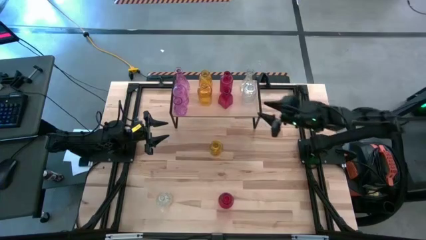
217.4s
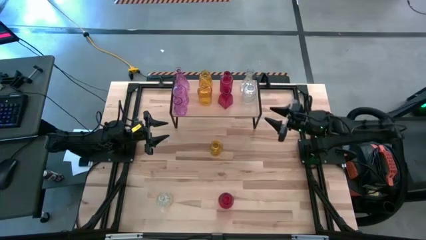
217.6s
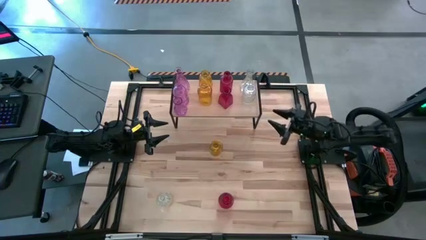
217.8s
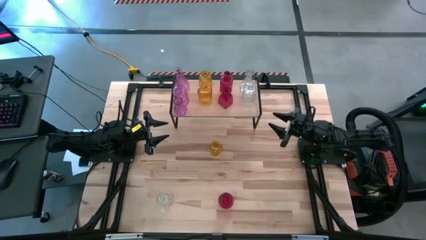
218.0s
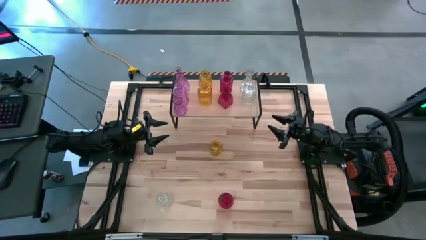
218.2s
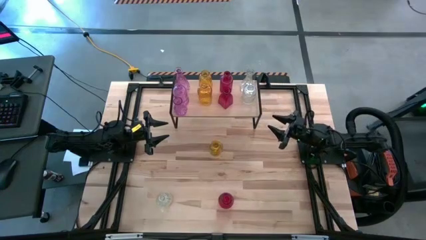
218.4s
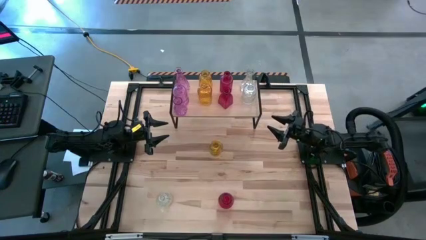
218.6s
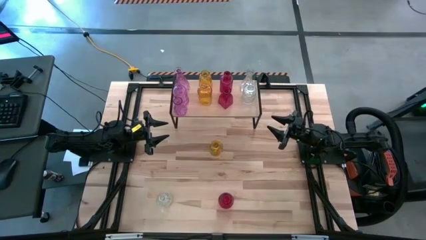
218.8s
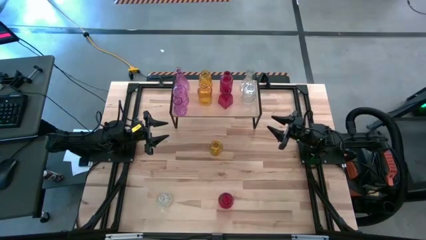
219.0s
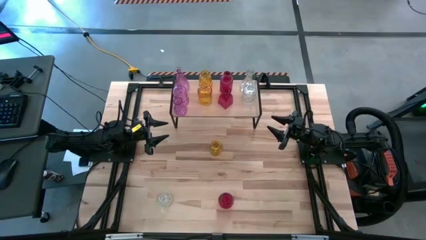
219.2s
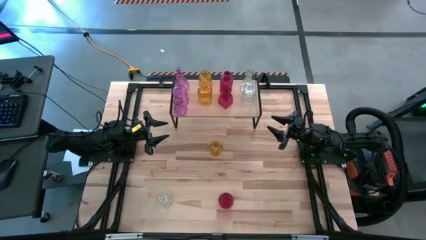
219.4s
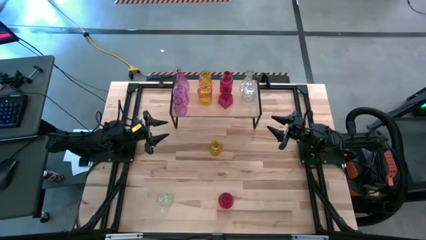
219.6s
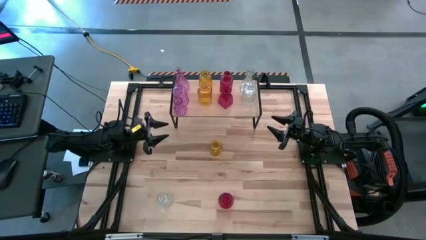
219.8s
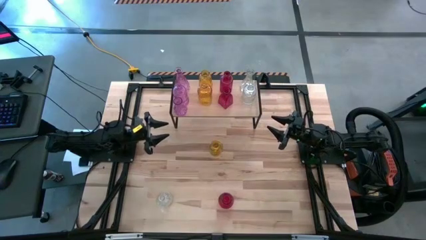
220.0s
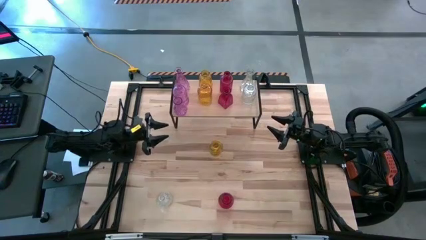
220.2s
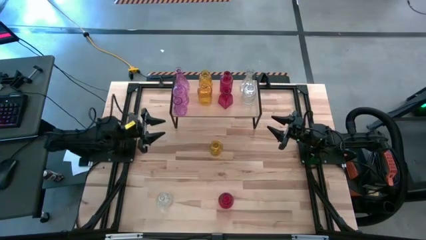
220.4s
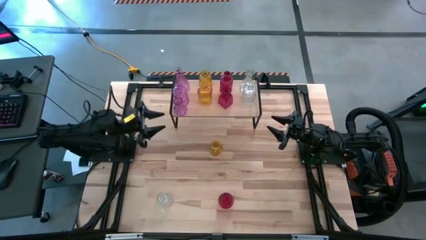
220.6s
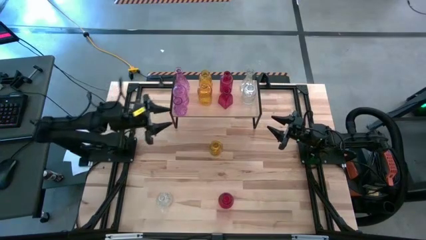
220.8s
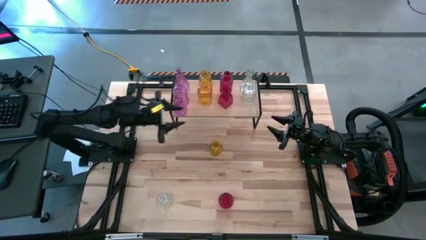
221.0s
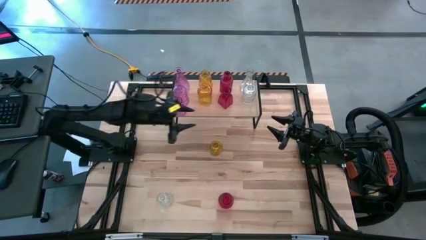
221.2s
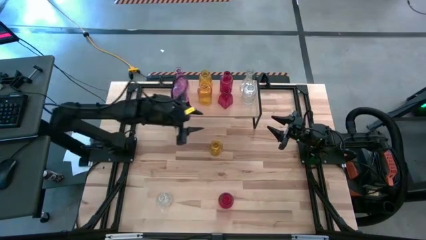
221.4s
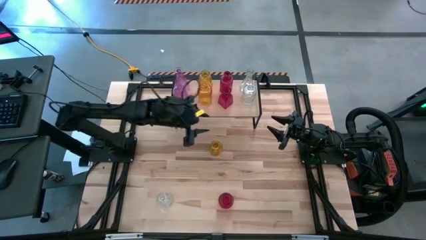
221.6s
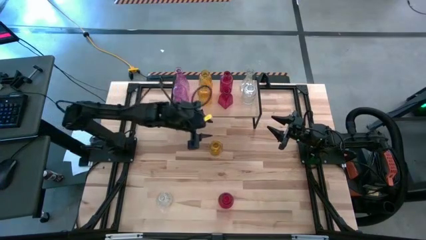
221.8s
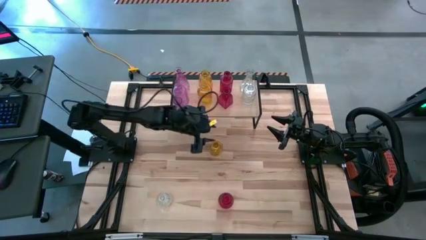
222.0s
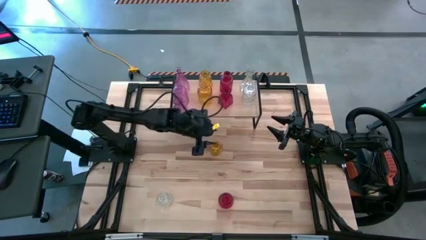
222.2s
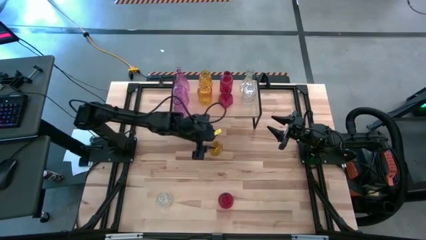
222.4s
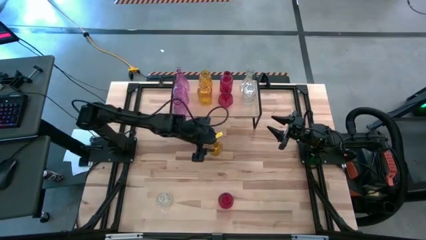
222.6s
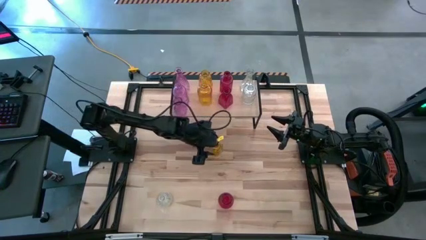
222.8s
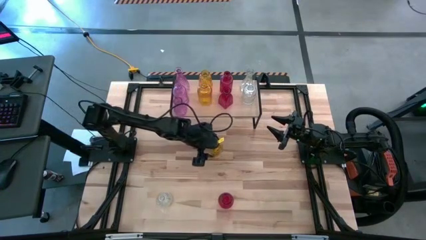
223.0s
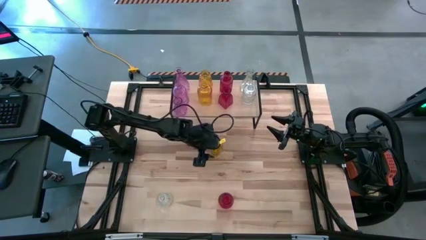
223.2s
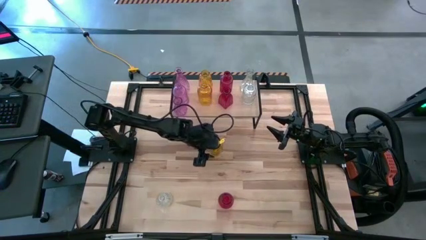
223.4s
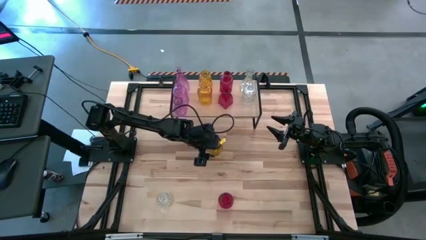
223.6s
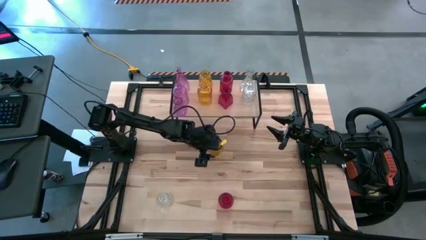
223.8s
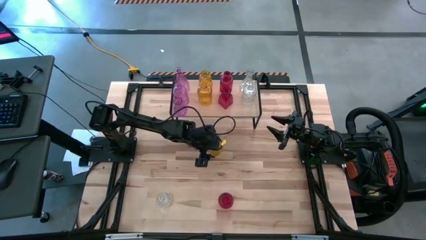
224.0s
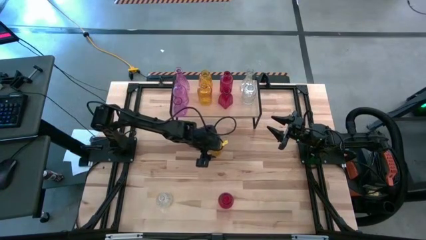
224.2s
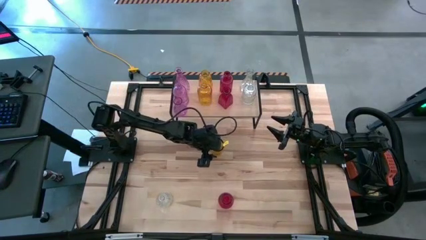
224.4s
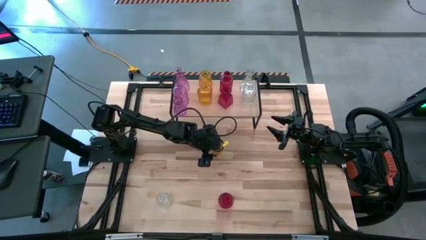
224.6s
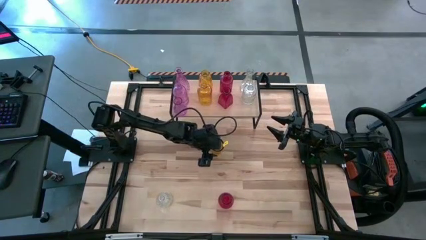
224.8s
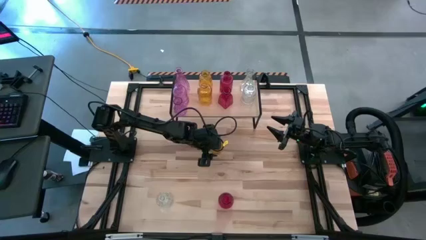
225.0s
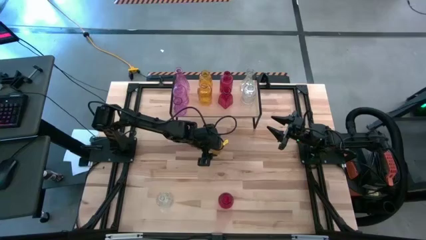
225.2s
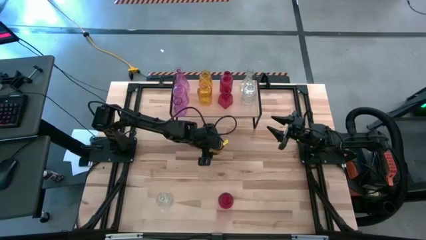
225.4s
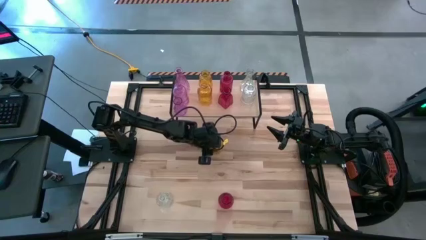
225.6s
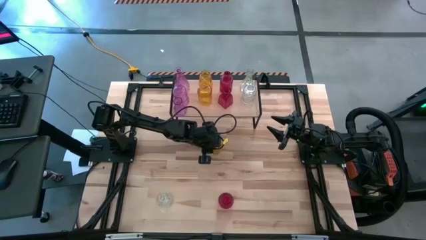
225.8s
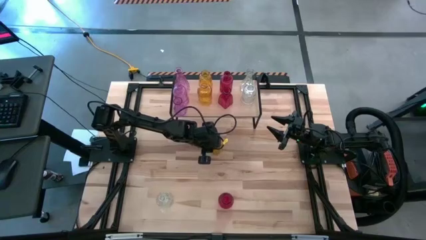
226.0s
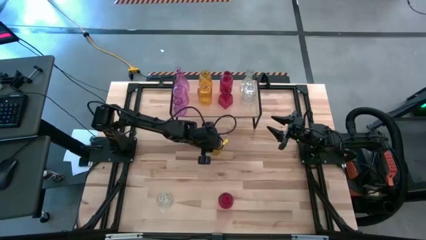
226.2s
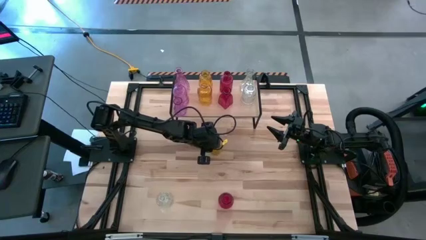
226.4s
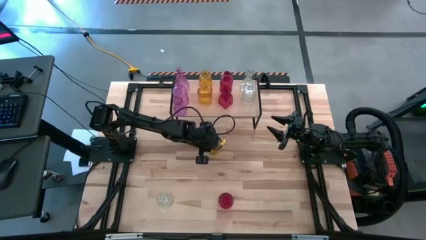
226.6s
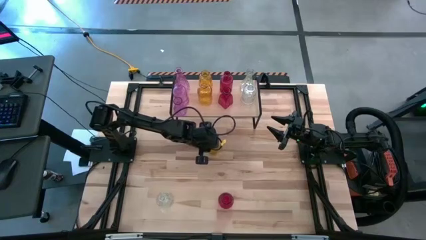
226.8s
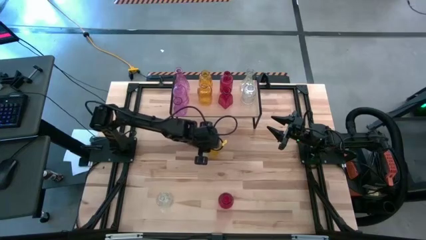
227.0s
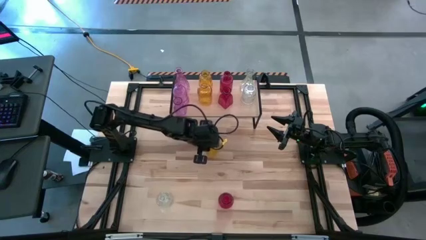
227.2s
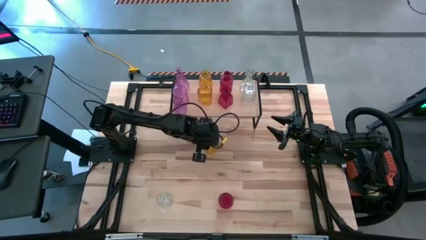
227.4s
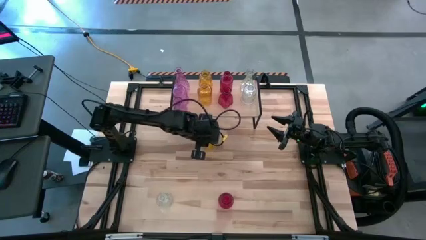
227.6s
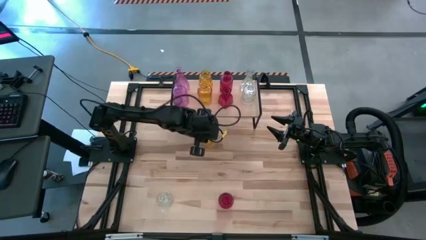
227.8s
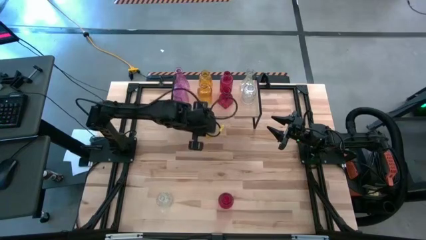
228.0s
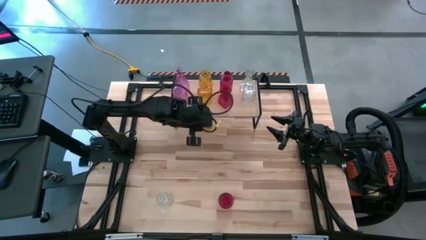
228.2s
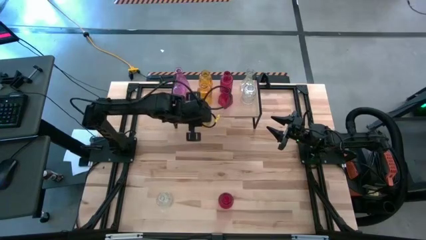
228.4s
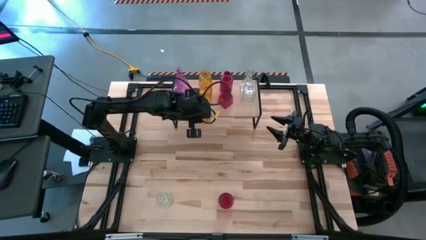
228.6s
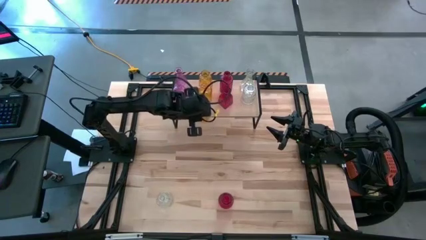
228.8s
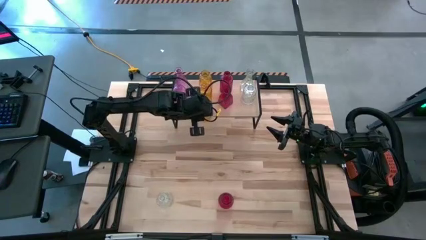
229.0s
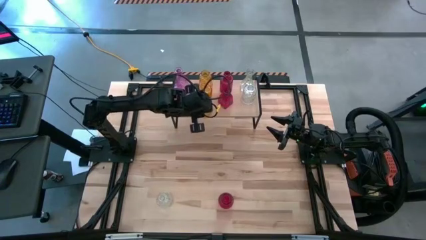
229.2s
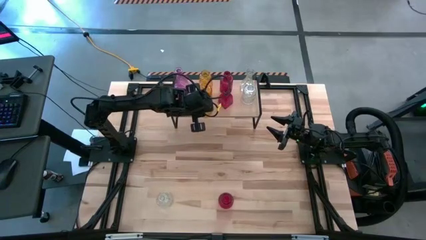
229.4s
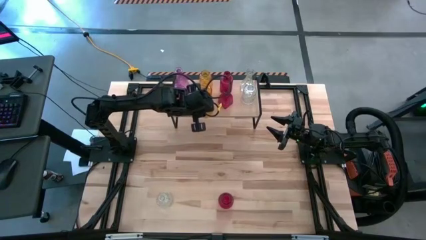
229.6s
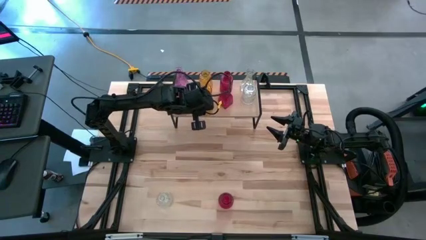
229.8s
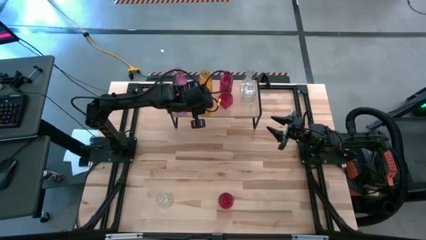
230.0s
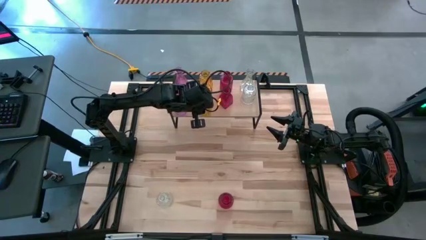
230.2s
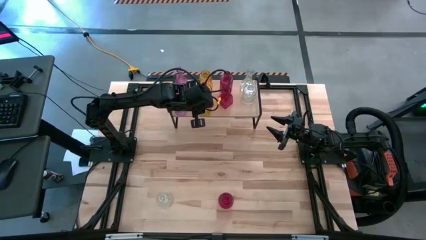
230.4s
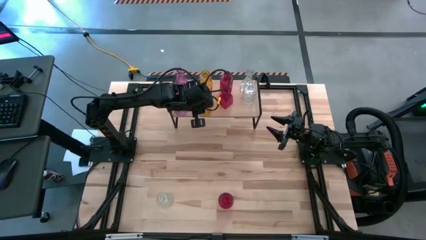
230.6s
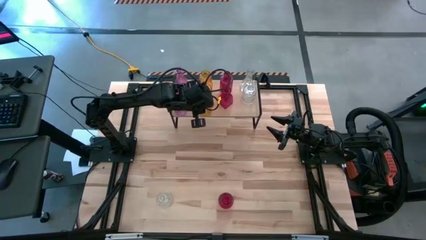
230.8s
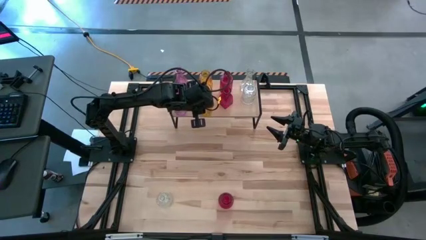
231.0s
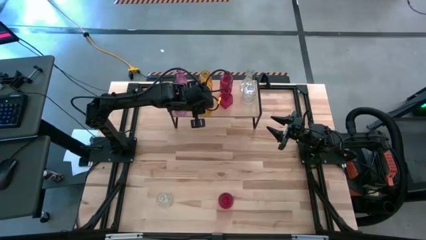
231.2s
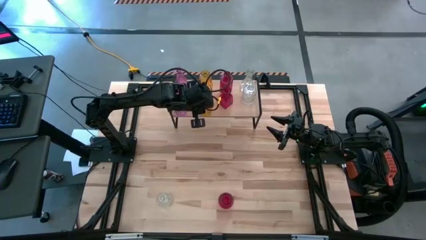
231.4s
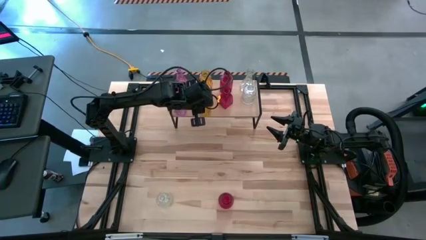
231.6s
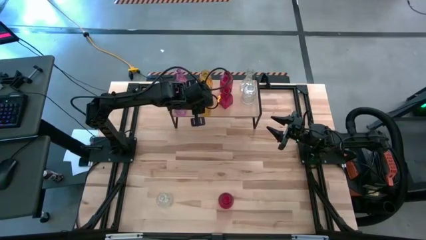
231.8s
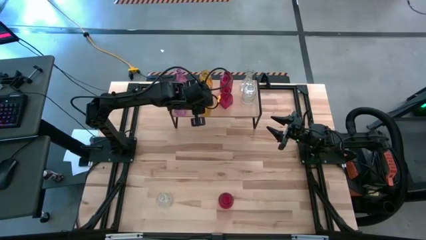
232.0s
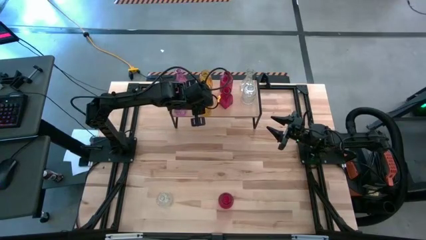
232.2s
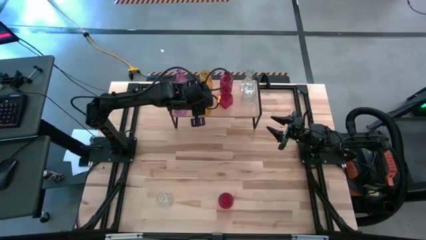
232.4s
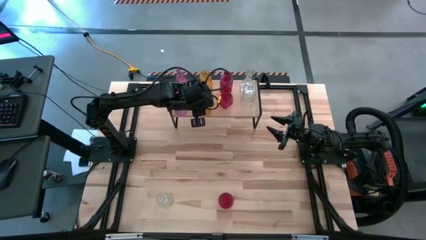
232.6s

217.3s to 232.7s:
Task: sort vases onto shelf
Put the yellow vase on the shelf and align it with the other yellow vases

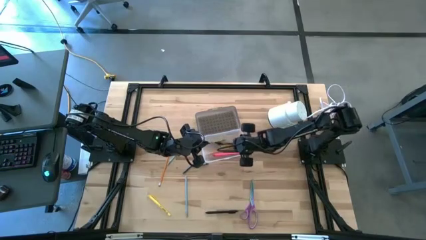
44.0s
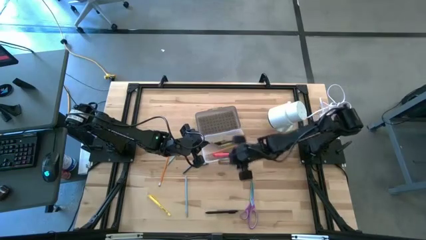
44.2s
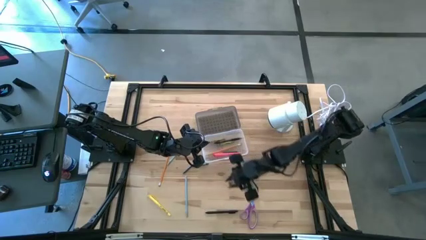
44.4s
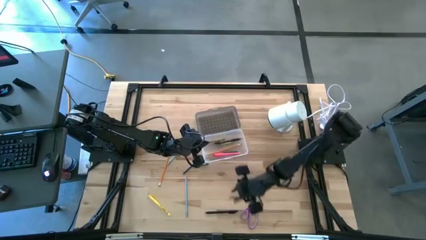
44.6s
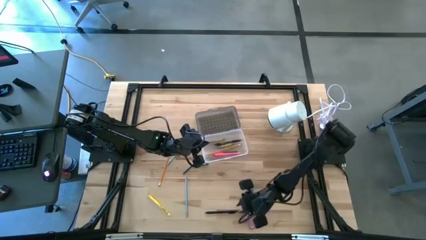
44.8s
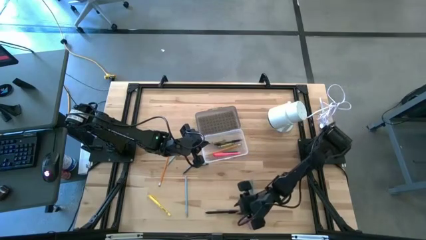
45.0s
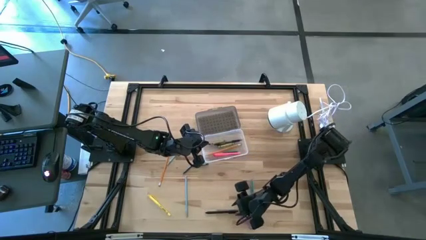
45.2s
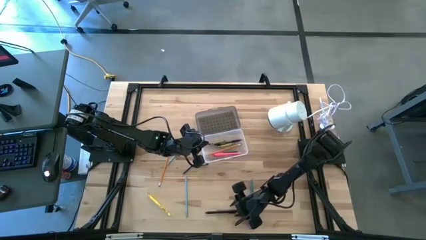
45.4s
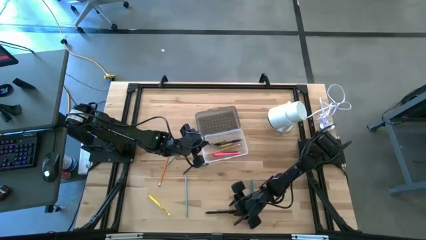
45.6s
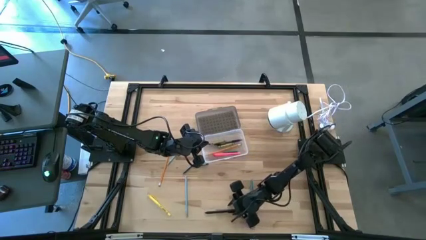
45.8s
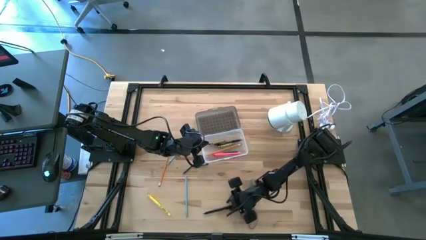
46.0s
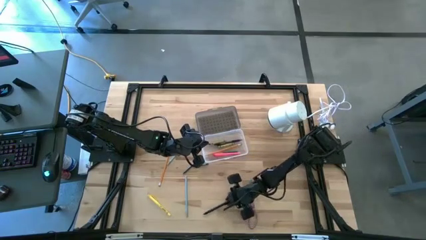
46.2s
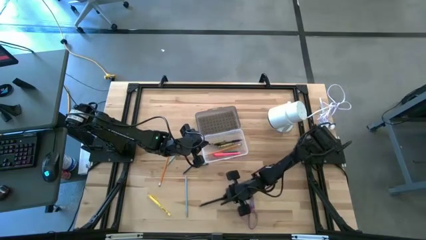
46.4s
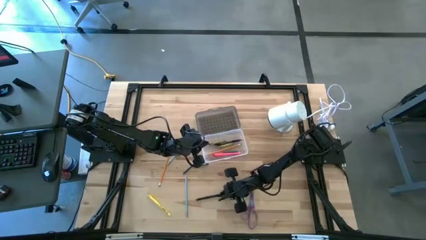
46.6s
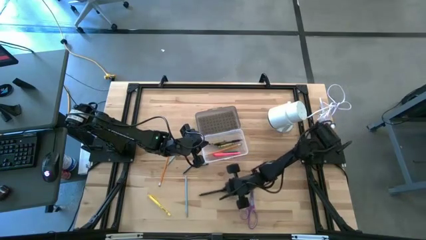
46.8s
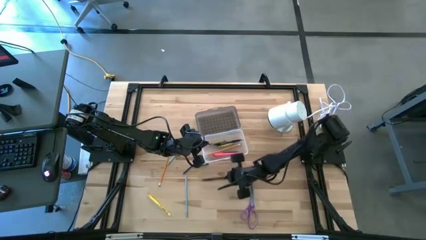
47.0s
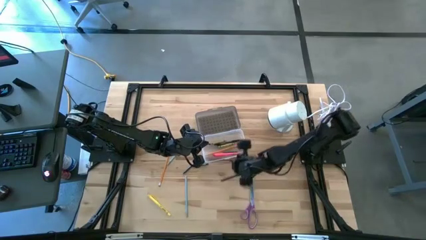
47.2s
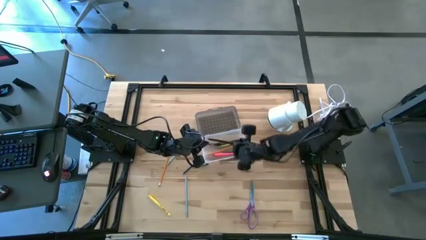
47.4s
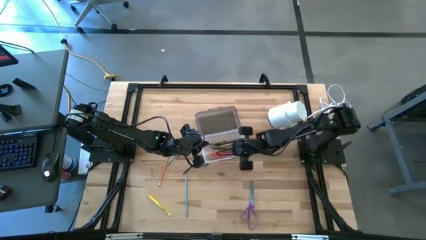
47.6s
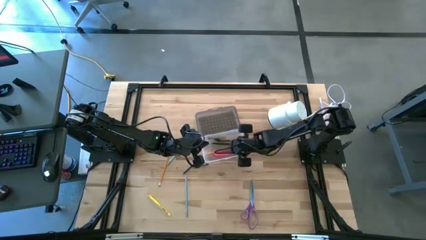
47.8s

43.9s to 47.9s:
Task: Pick & place school supplies into a supply box
Put the black pen into the gray supply box
